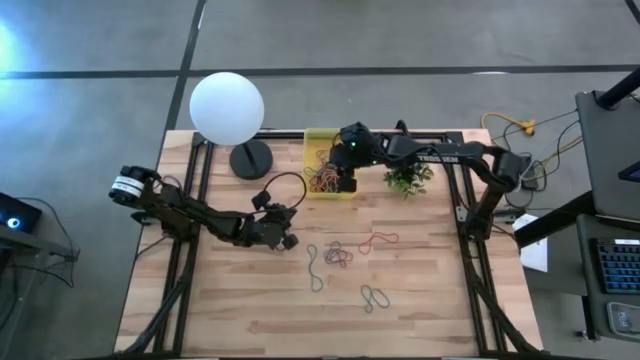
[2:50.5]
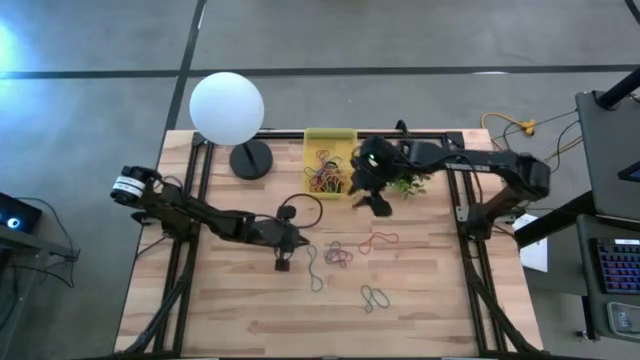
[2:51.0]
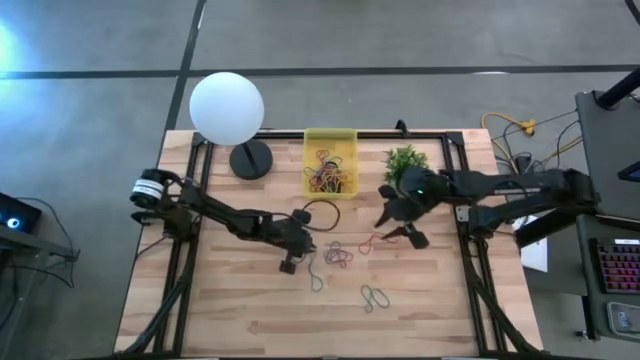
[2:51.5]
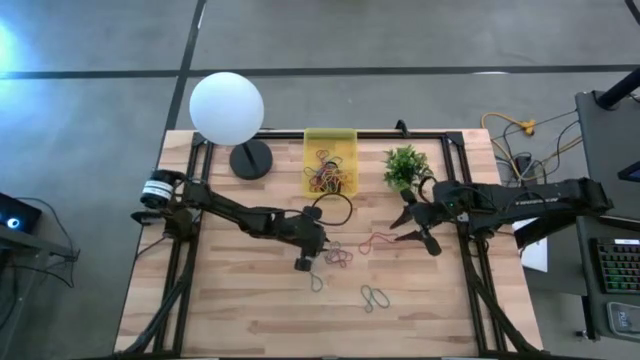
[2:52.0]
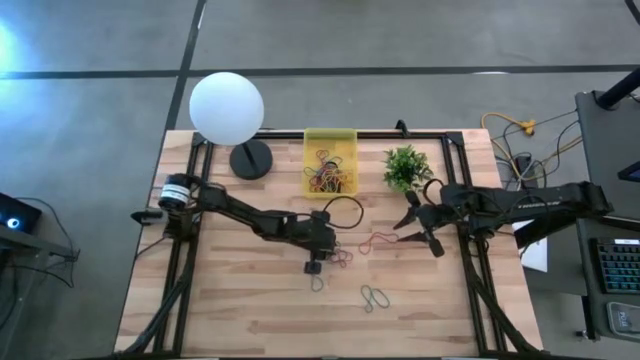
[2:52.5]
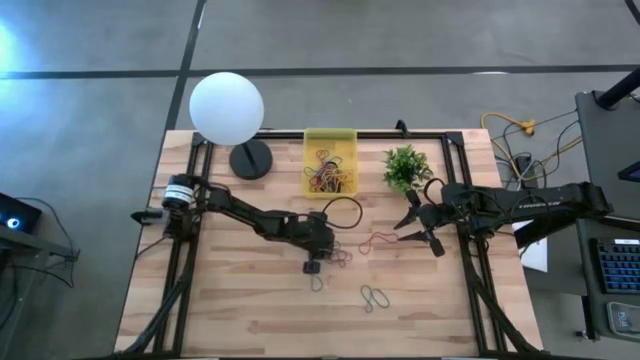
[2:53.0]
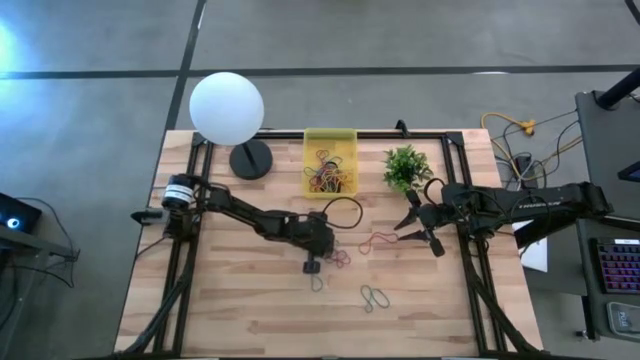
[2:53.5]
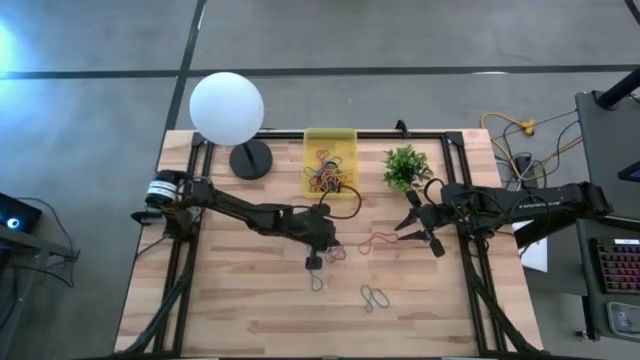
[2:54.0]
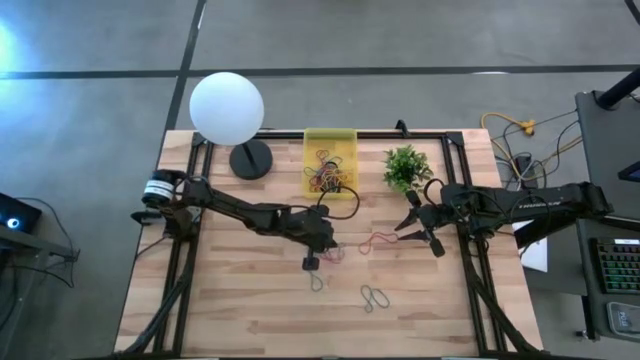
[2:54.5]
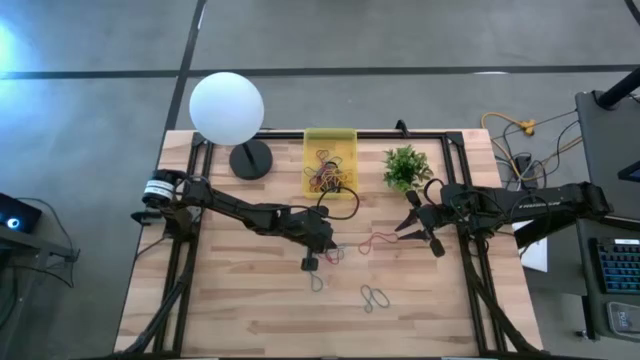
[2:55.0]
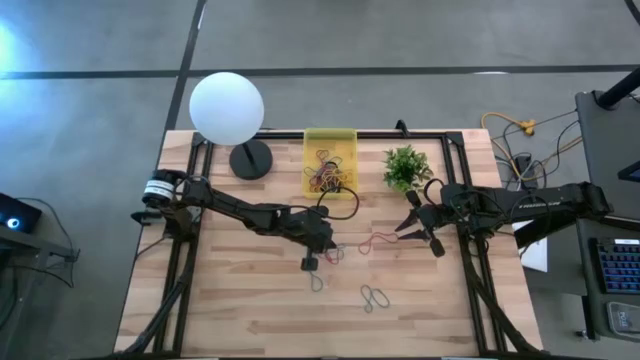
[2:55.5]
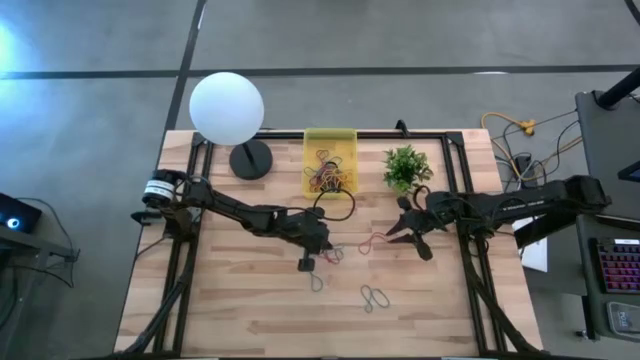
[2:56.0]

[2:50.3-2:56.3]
Task: Pick and place rubber bands into bin
Put the red rubber band into the yellow bin

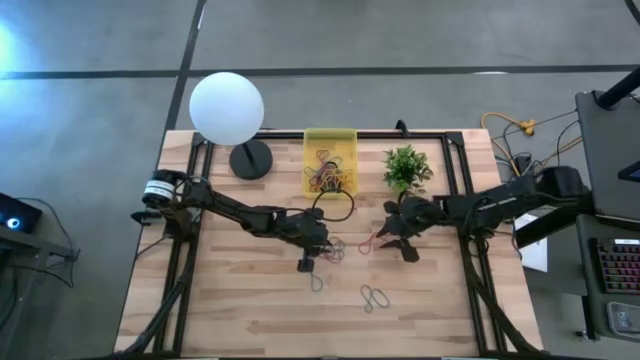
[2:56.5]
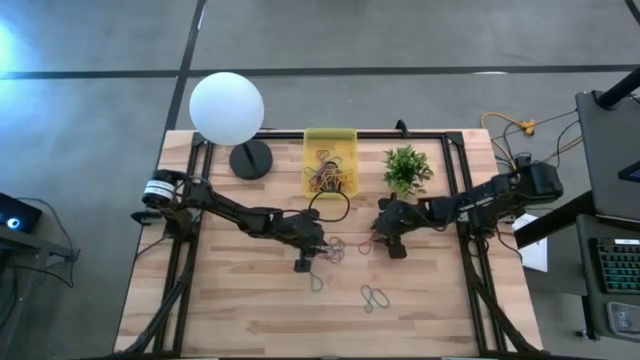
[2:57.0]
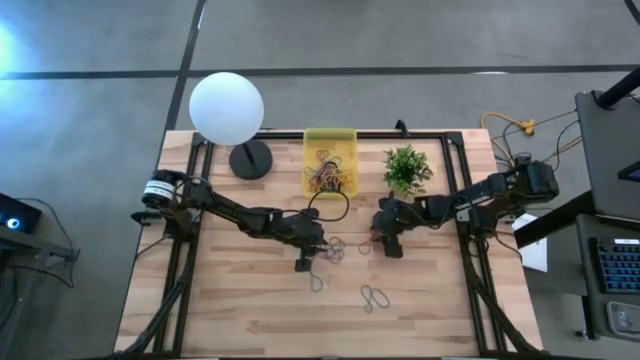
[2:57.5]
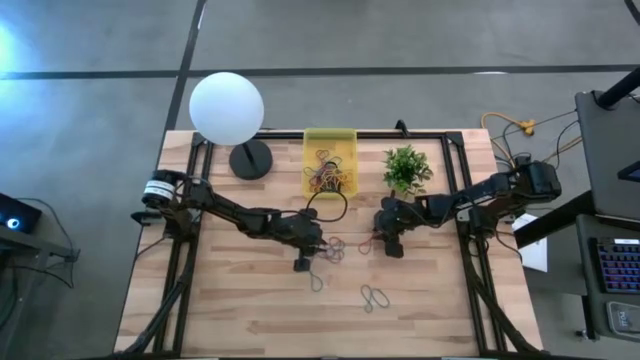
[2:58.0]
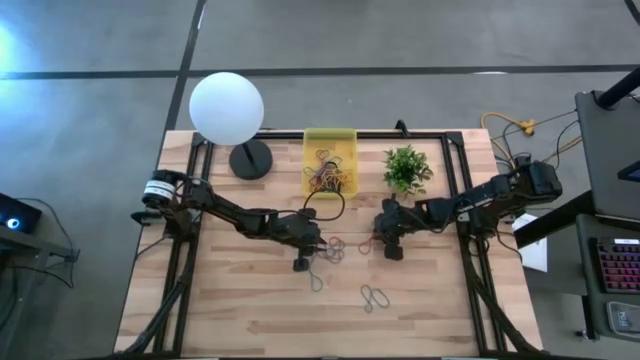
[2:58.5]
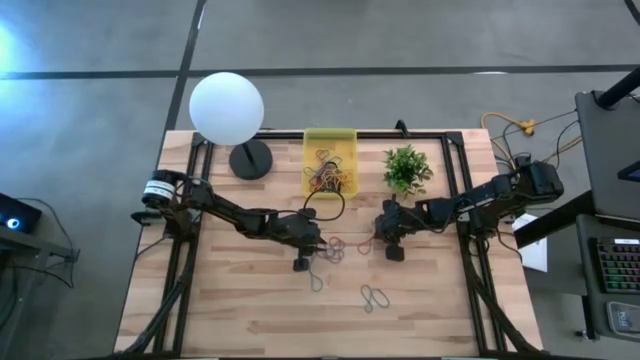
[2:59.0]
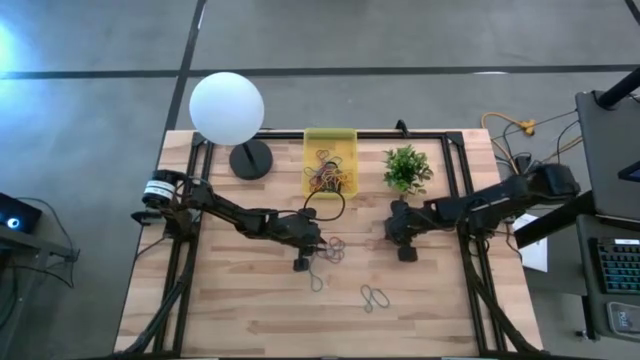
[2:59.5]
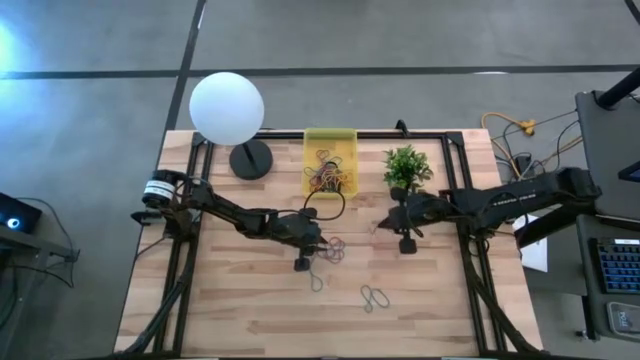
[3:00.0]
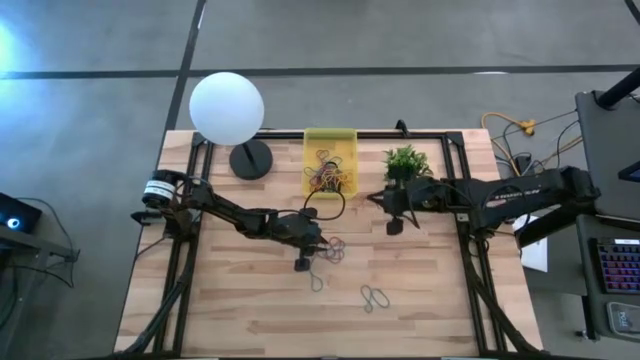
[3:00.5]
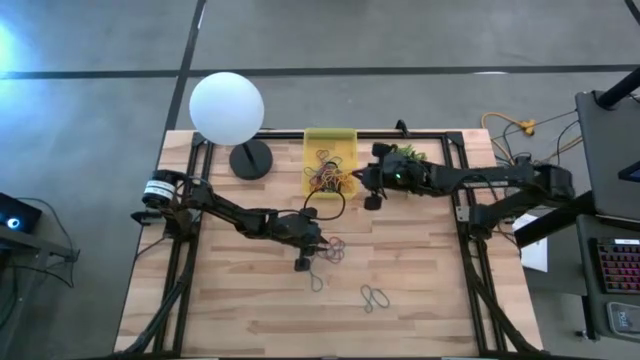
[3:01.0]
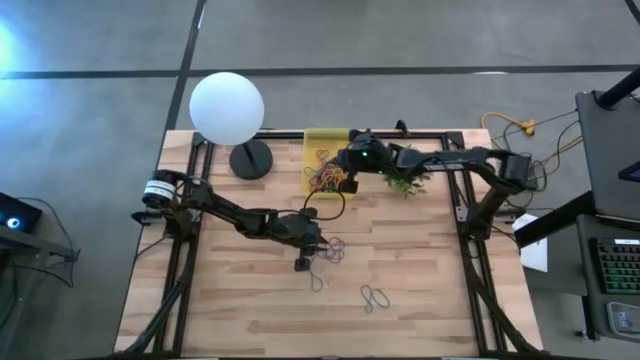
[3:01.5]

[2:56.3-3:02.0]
Put the red rubber band into the yellow bin

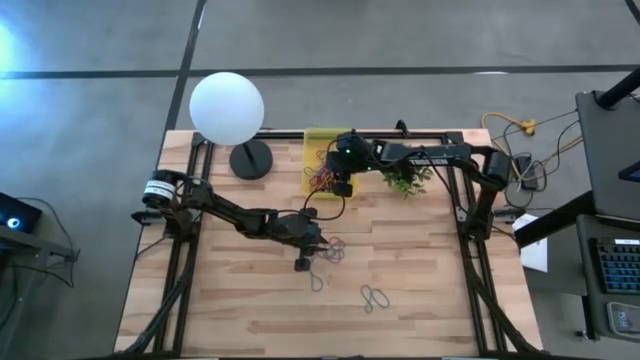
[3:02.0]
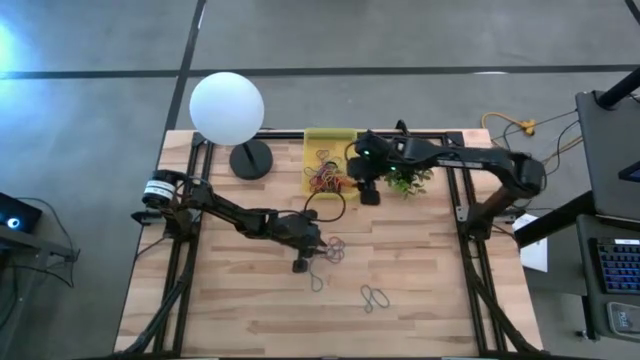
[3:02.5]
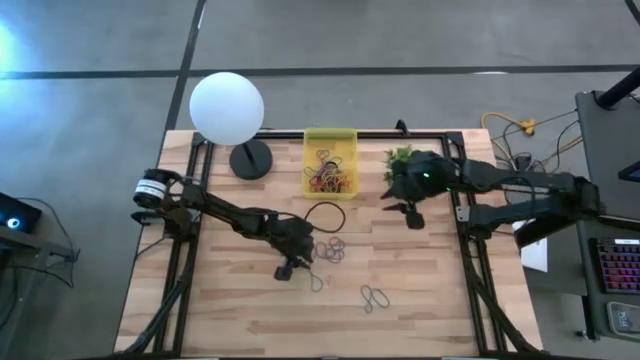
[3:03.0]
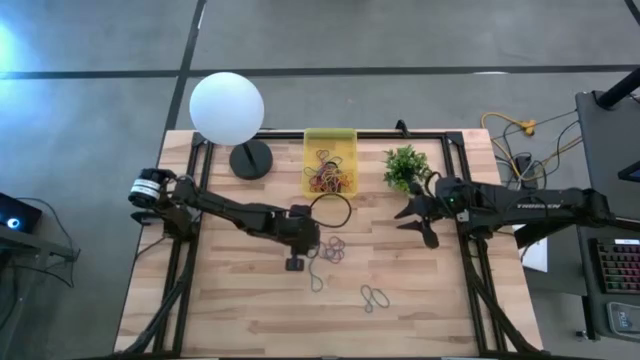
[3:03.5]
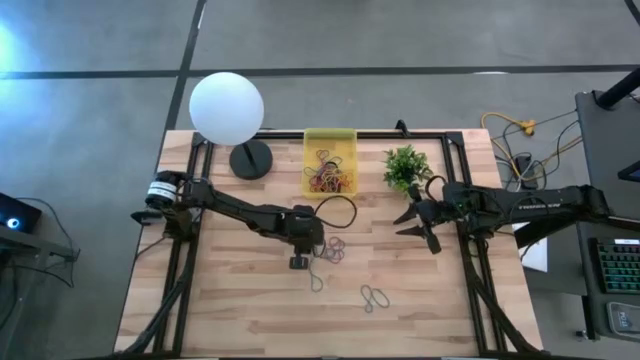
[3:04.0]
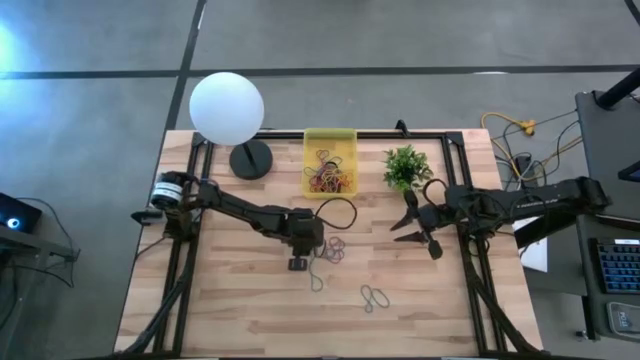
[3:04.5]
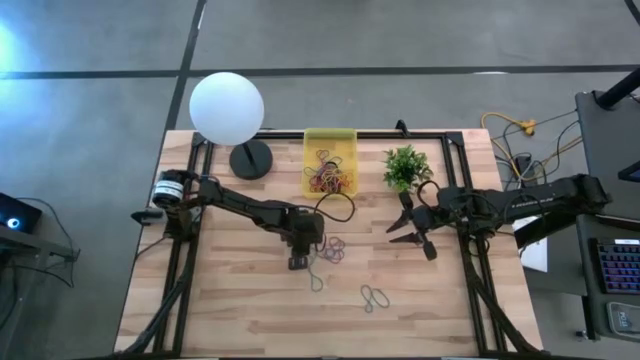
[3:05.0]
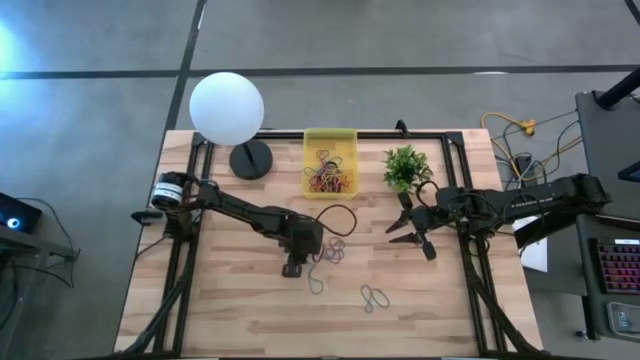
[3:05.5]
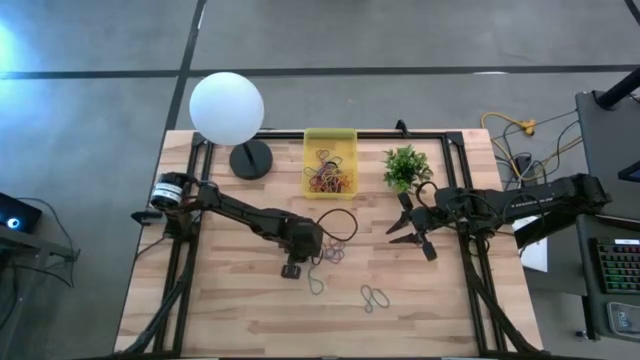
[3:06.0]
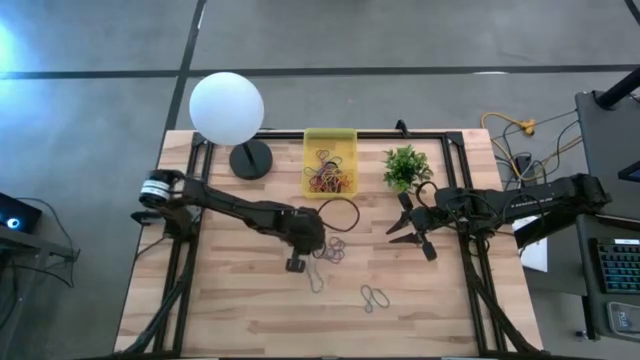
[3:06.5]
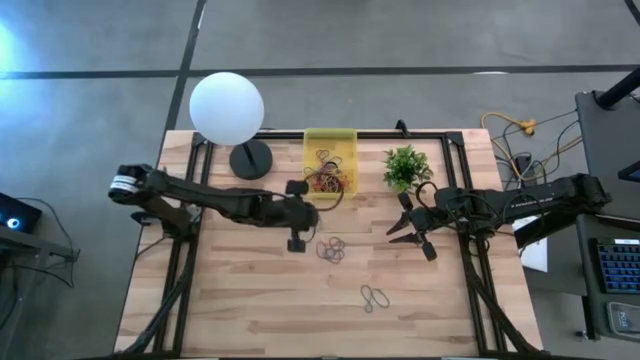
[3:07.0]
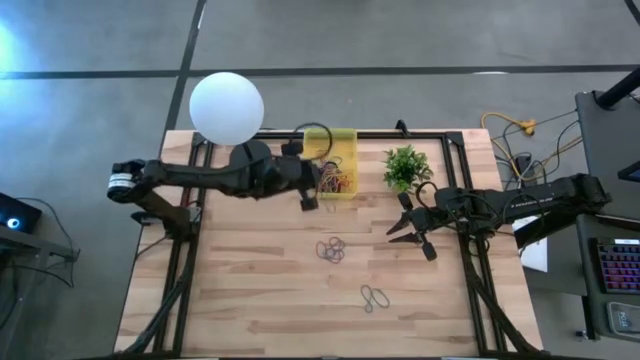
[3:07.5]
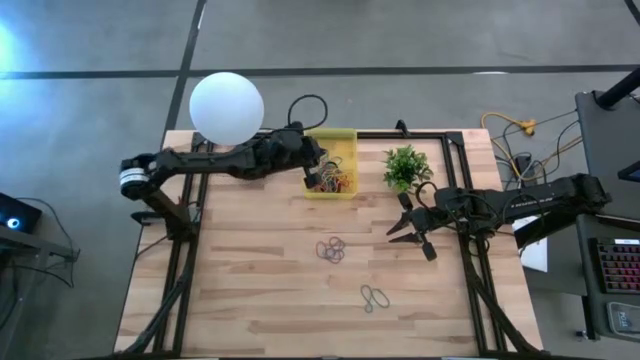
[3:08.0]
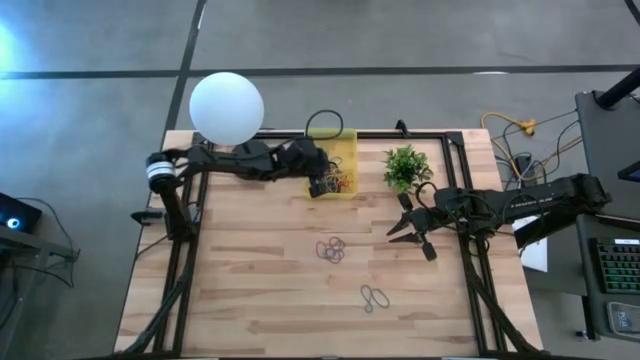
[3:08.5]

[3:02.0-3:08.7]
Put the blue rubber band into the yellow bin

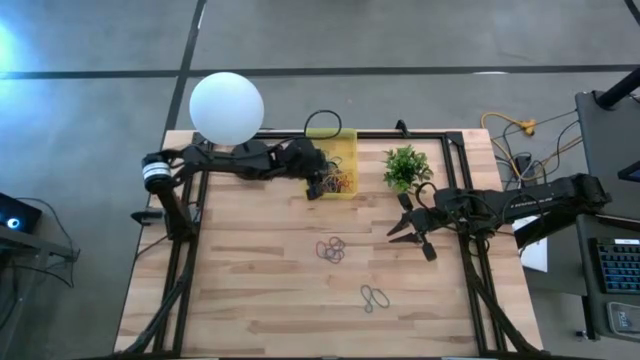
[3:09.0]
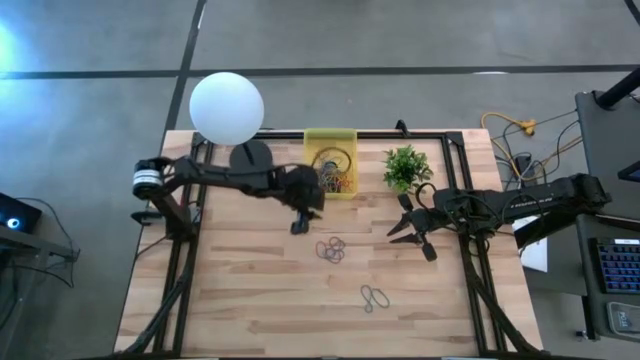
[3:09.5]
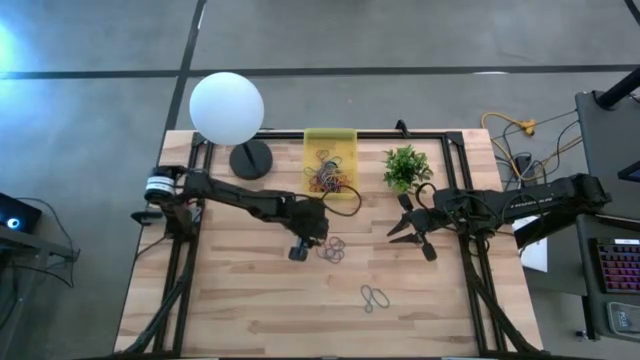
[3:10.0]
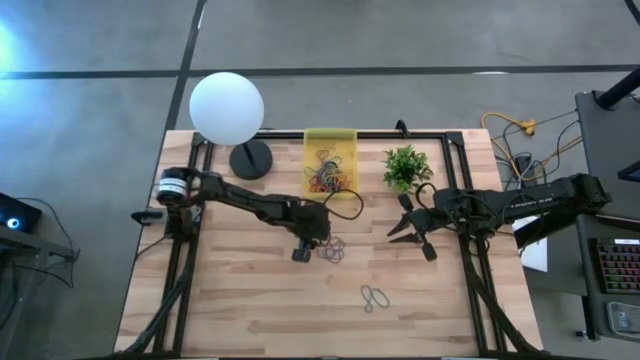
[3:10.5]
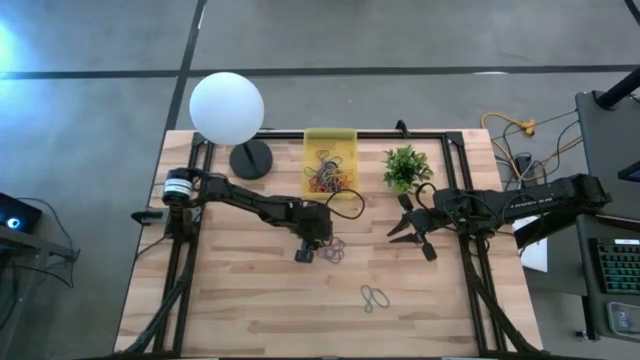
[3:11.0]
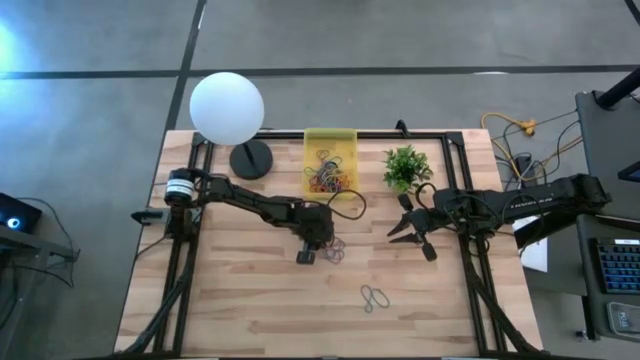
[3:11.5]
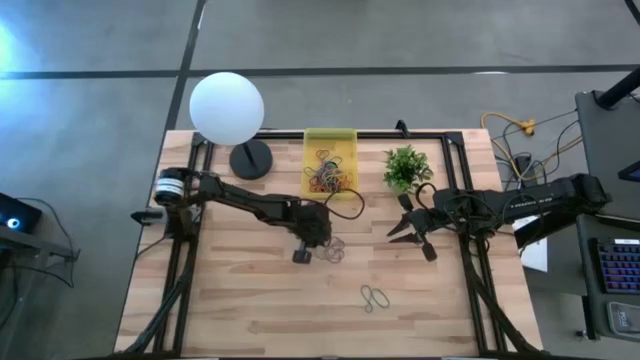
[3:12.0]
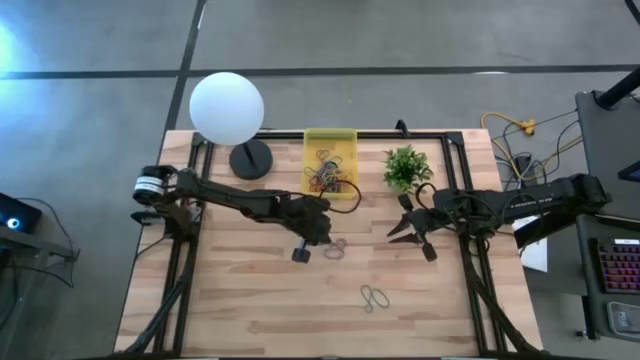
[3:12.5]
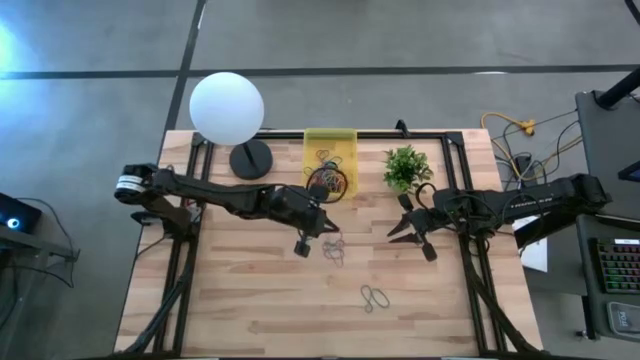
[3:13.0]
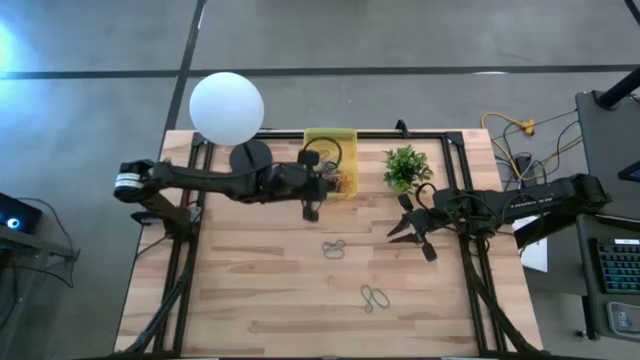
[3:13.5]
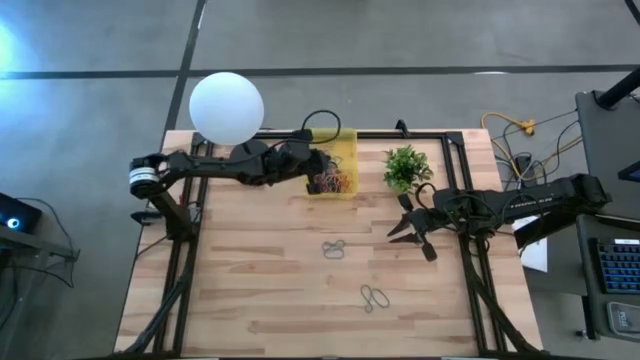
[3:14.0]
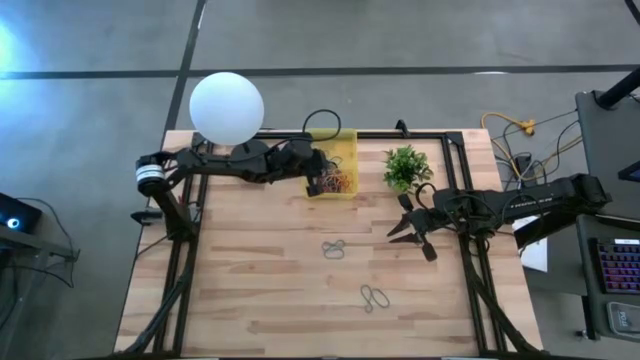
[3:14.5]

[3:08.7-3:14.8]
Put the red rubber band into the yellow bin
